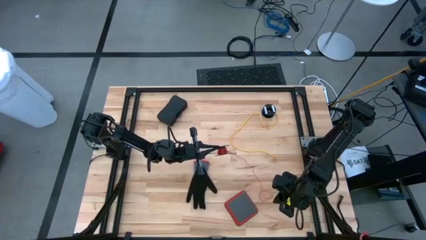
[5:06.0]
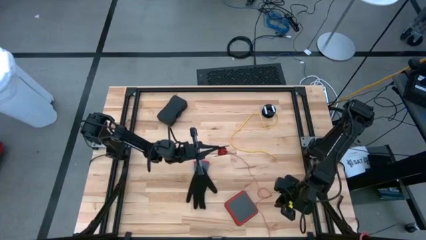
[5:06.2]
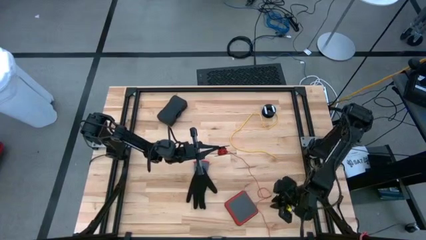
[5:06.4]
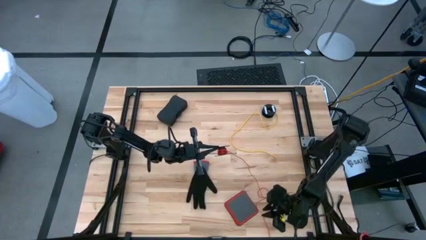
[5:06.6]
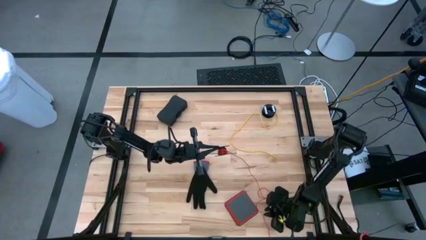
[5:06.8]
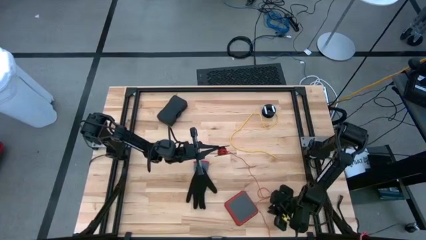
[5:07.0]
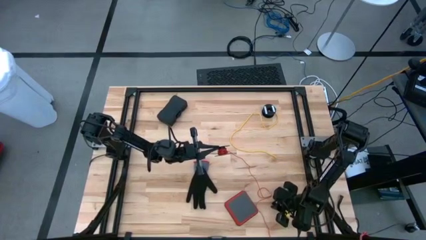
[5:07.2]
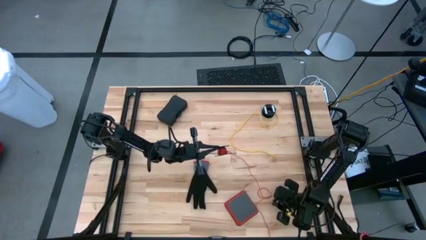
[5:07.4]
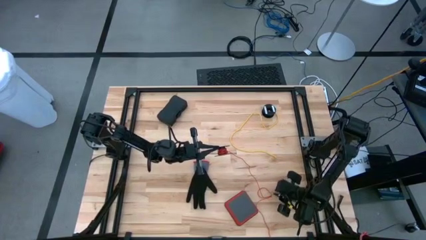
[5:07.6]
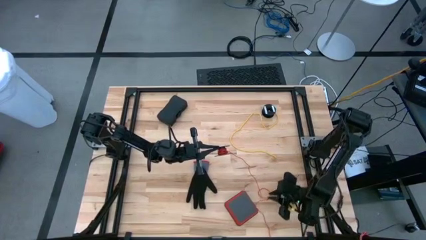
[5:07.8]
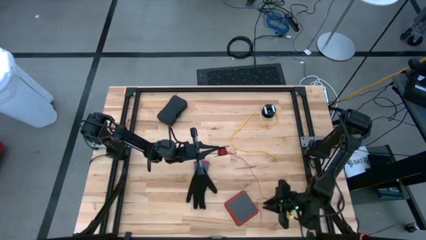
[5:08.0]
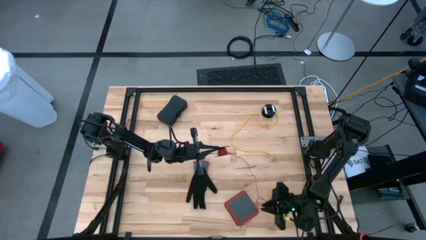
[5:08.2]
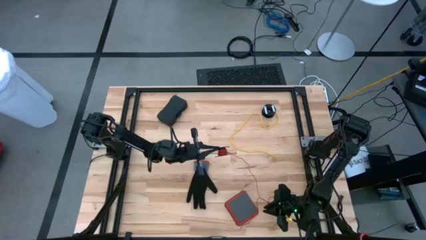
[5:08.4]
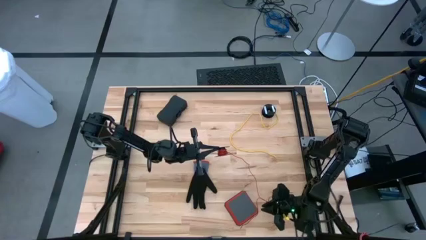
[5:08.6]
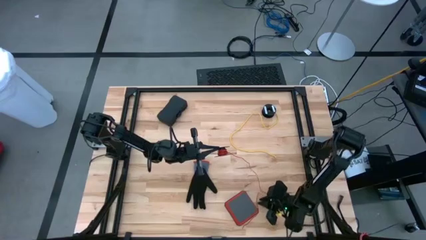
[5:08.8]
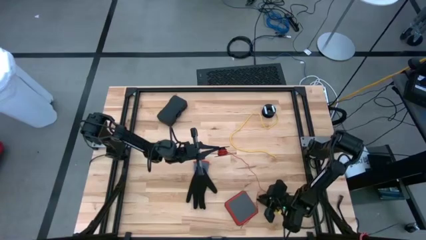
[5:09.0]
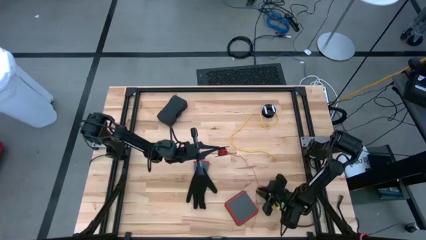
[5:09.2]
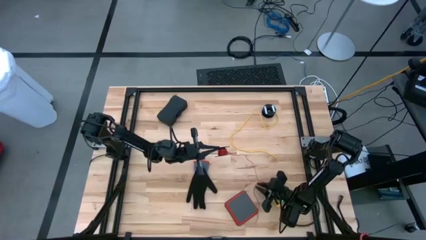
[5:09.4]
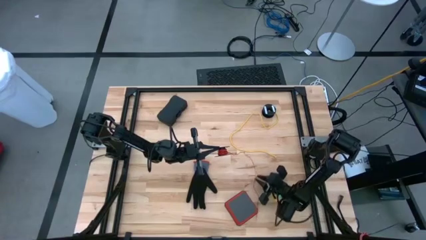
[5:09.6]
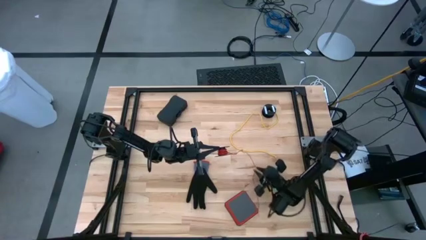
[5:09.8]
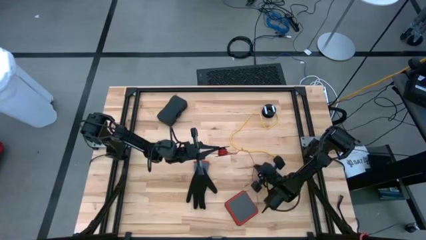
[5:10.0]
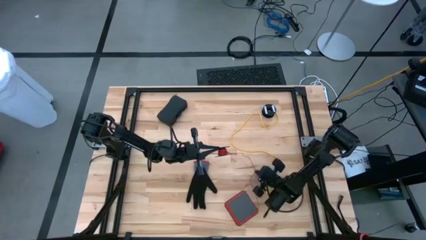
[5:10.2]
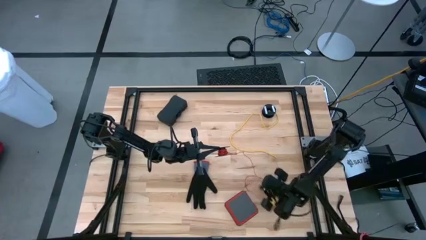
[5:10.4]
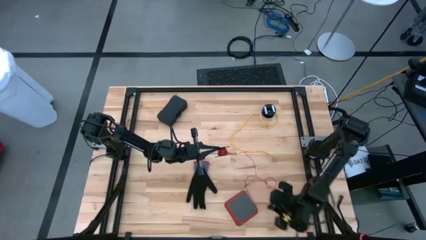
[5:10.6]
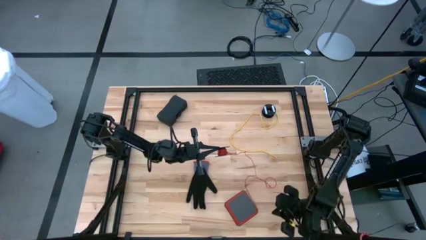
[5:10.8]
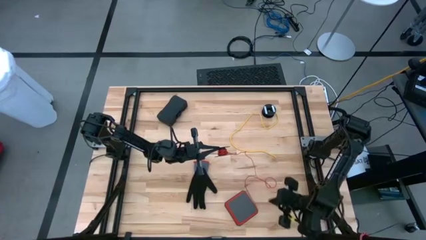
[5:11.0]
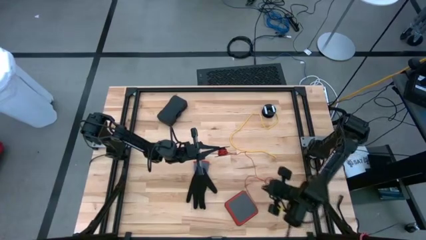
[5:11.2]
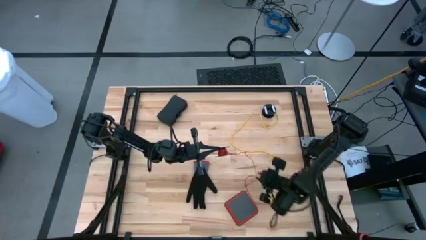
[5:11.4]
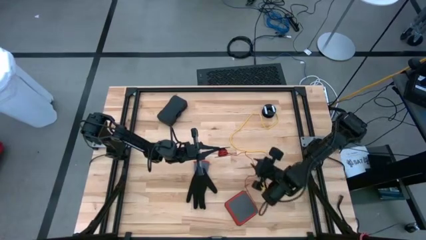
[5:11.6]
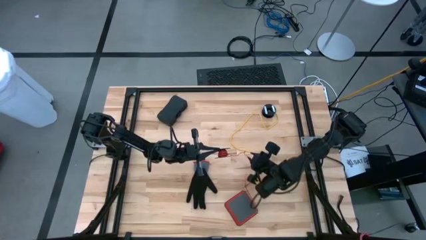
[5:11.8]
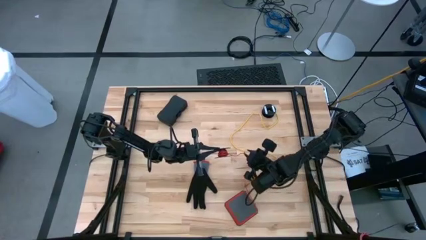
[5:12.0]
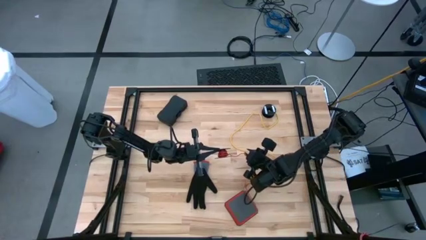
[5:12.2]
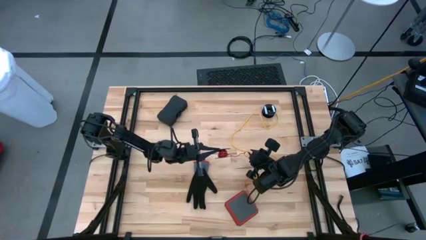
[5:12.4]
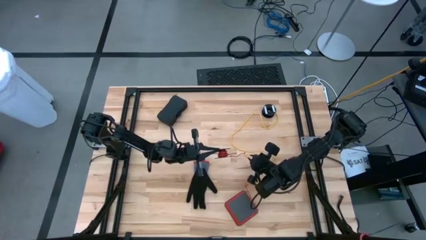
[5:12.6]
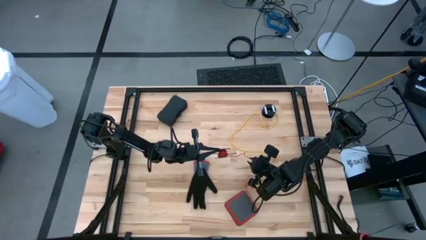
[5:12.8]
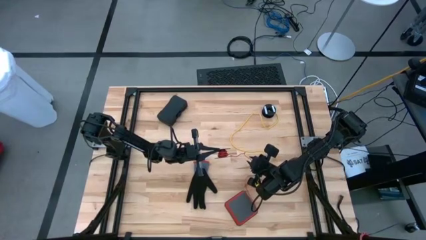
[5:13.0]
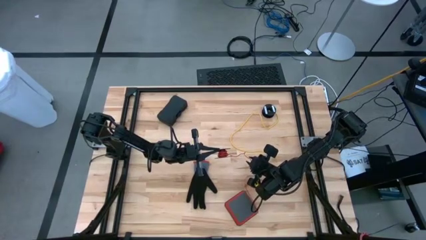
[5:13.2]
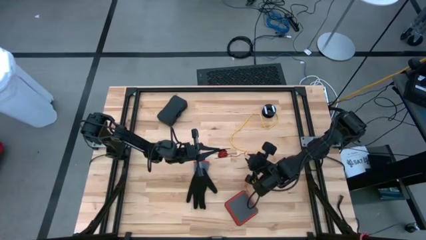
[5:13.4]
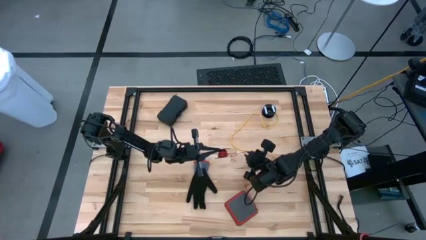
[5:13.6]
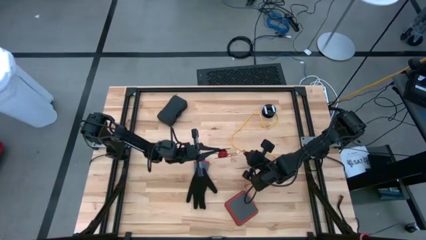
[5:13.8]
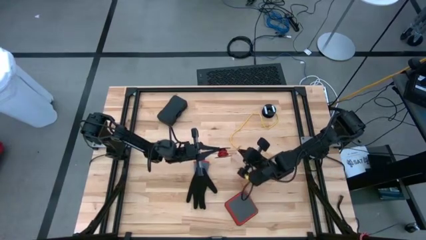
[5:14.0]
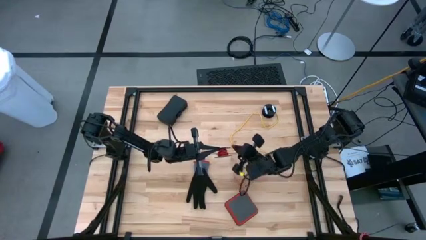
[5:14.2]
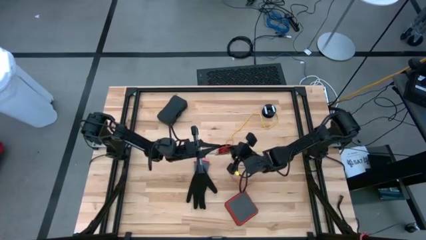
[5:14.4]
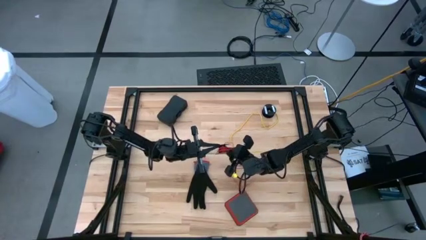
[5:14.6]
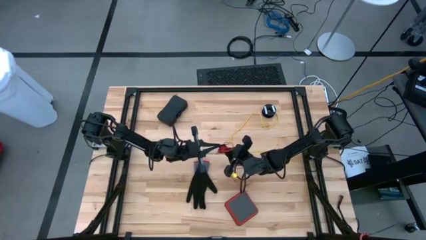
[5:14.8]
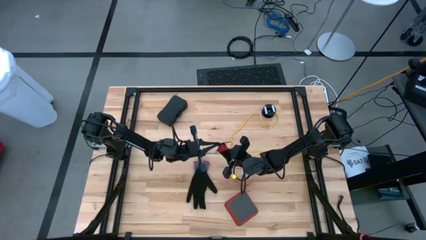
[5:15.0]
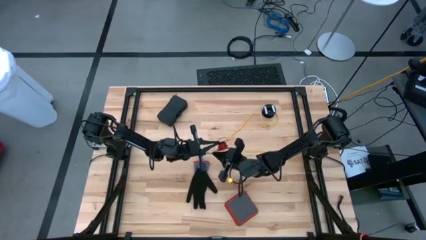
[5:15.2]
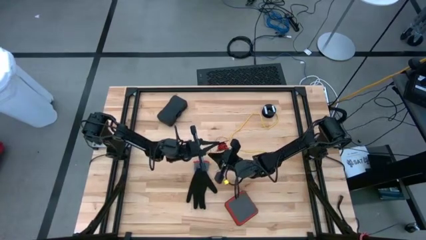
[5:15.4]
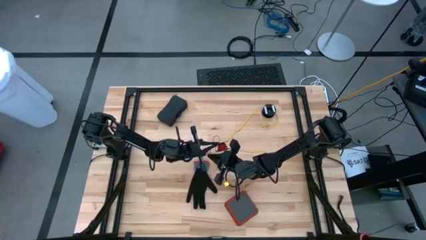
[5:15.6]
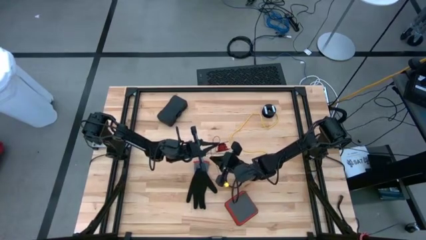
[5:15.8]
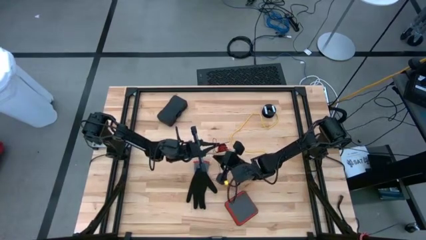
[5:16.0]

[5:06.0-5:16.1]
Task: Coil cords
Coil the red wire onto the black spool

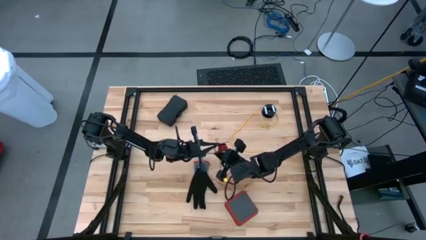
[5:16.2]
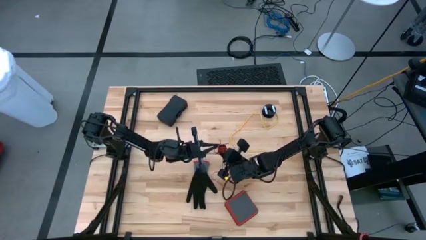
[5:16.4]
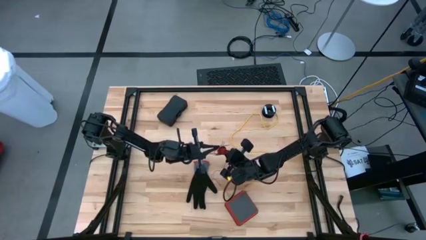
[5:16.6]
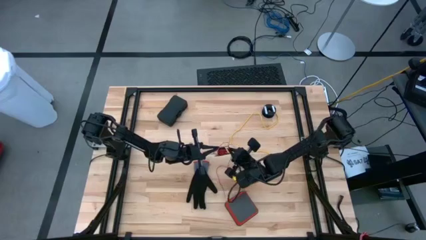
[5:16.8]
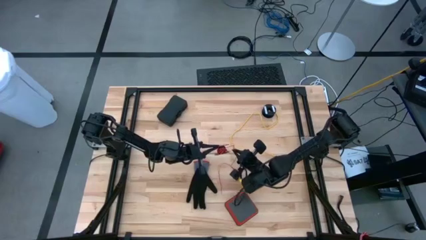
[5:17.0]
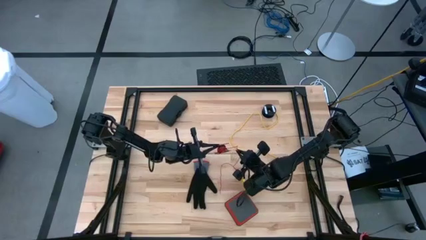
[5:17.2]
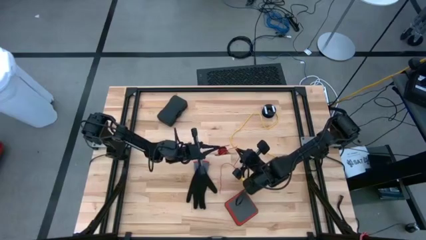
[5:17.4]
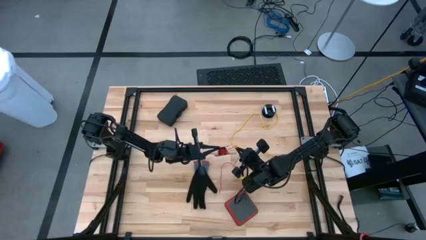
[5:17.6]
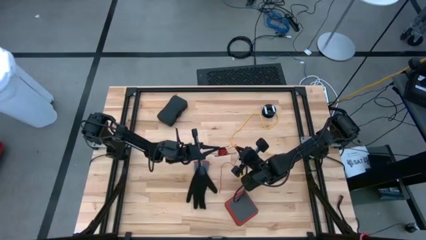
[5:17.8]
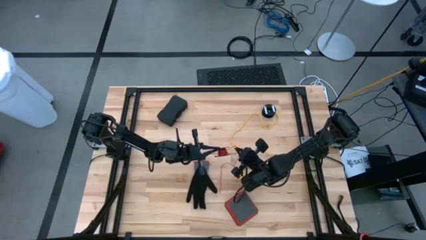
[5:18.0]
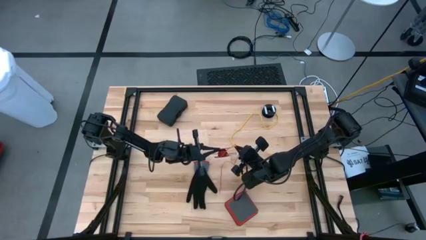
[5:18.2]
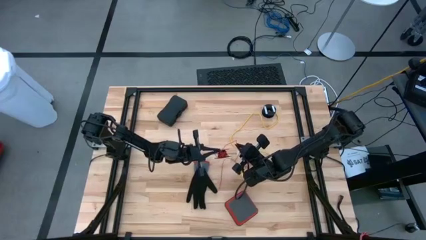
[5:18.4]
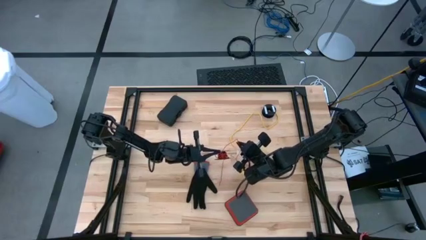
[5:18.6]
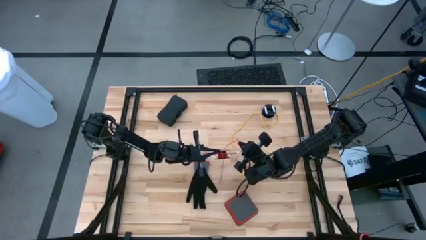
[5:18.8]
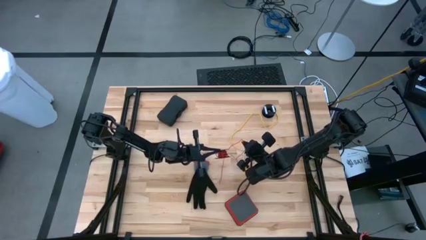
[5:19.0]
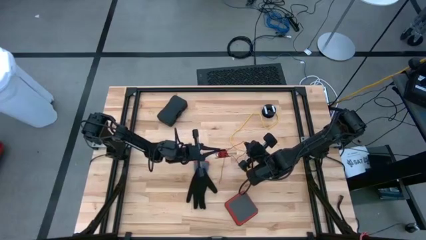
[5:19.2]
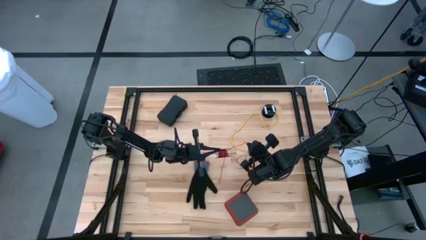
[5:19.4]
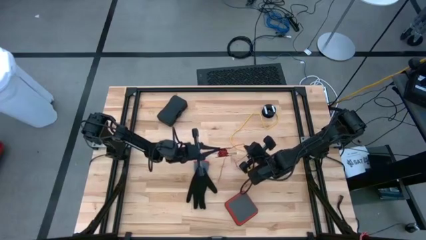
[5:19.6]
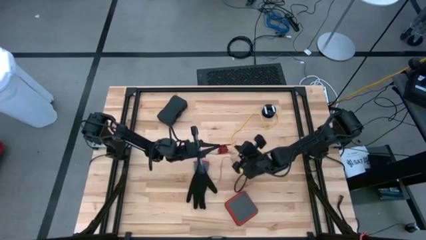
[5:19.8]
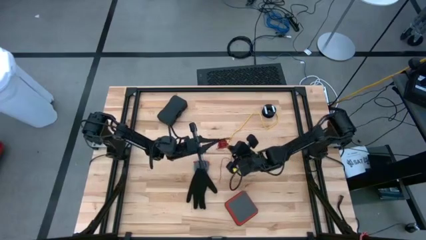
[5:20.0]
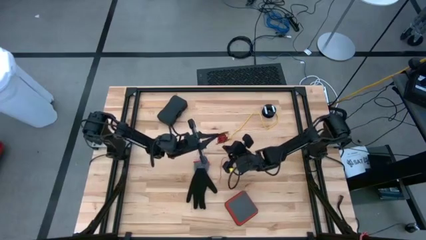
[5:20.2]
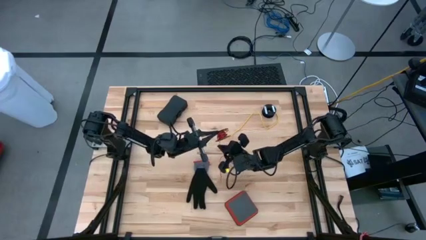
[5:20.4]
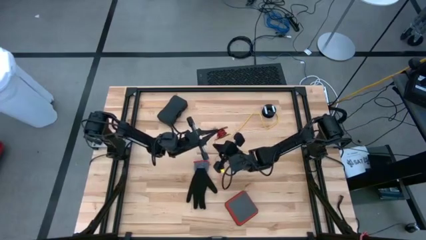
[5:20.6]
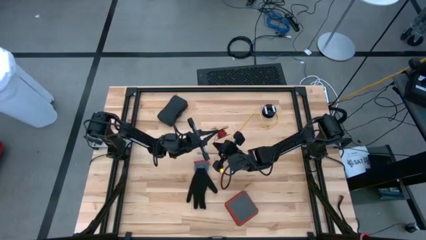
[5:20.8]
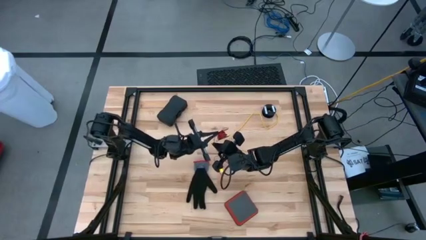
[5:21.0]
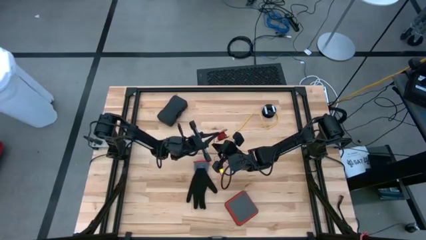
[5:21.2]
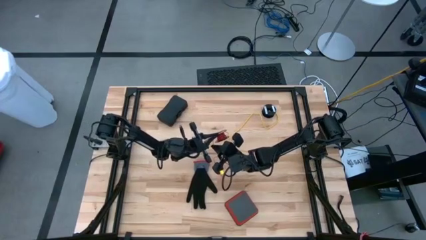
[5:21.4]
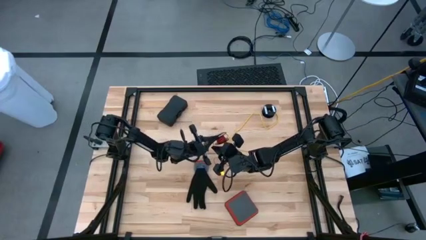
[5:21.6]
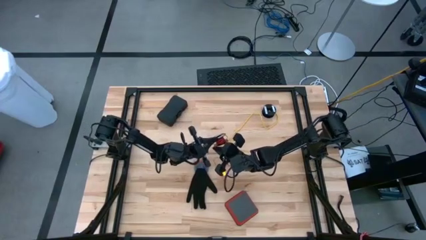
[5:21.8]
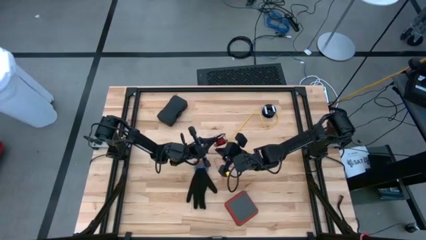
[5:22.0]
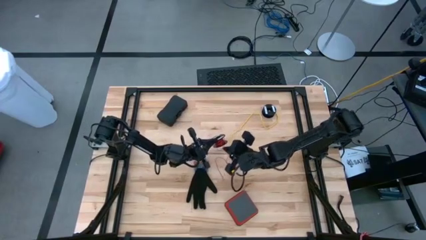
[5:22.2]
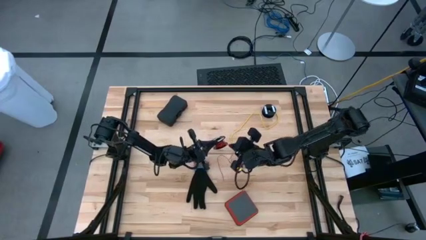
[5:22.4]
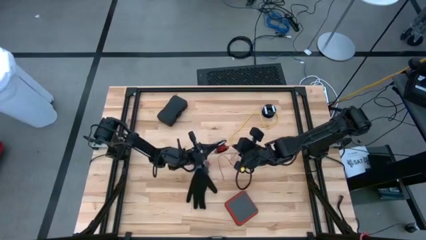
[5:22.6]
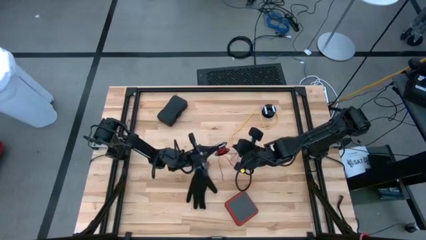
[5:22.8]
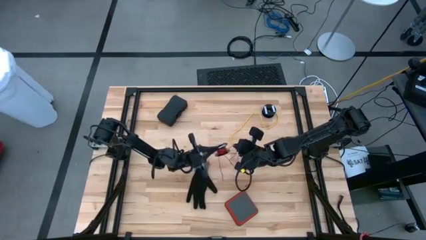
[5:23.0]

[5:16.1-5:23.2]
Coil the red wire onto the black spool
